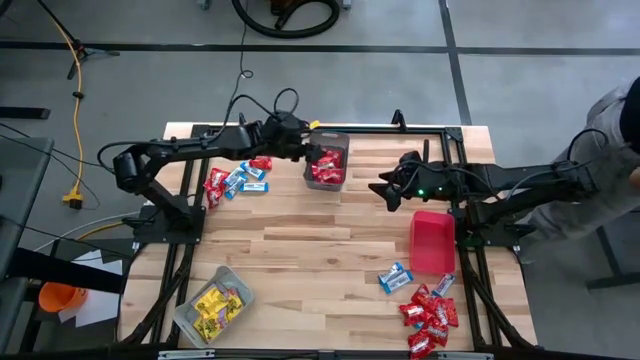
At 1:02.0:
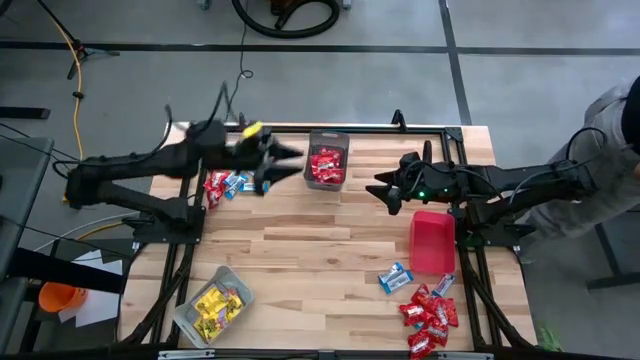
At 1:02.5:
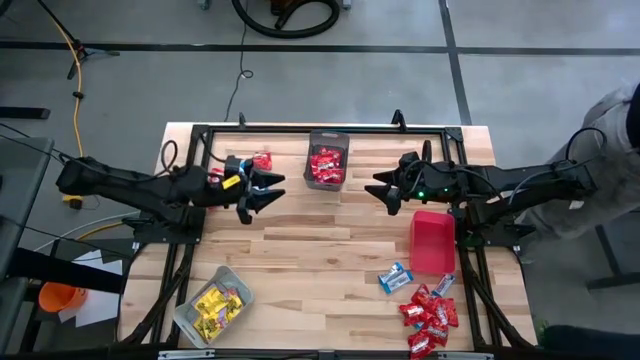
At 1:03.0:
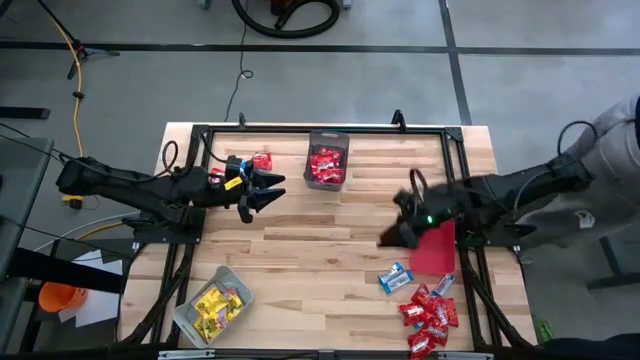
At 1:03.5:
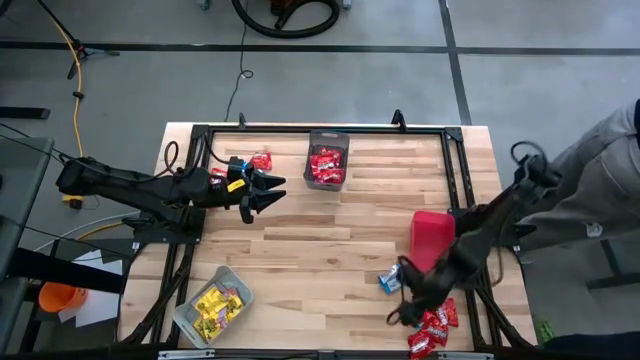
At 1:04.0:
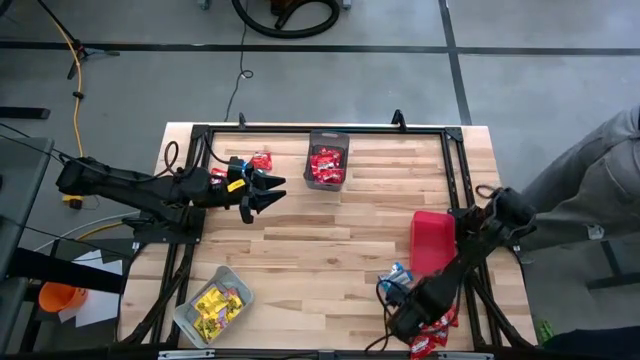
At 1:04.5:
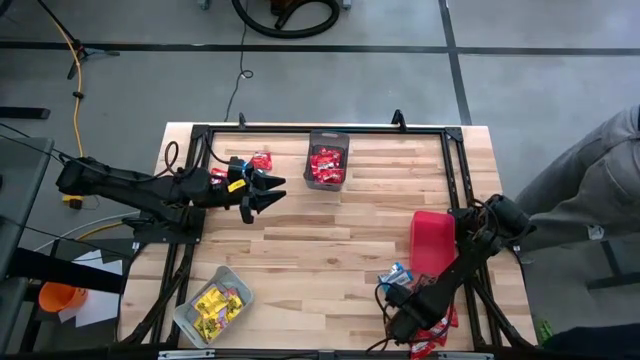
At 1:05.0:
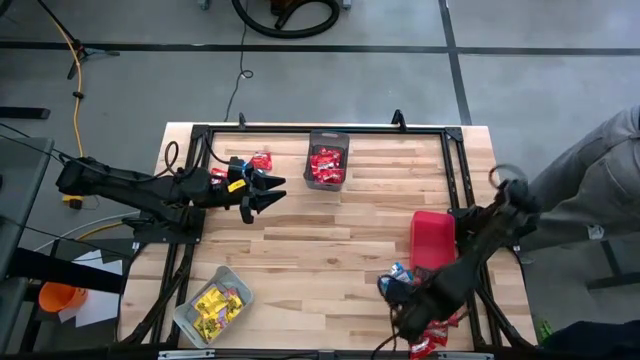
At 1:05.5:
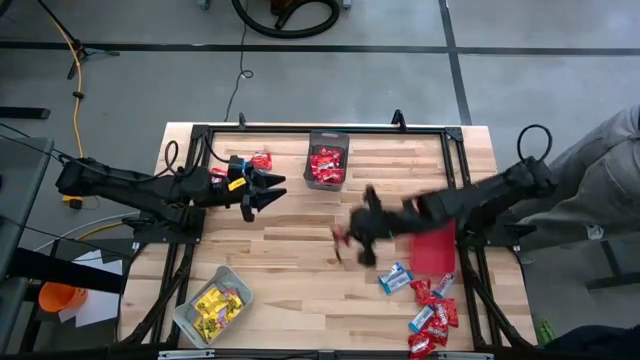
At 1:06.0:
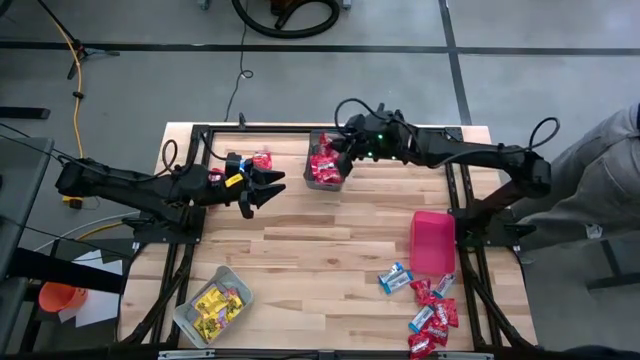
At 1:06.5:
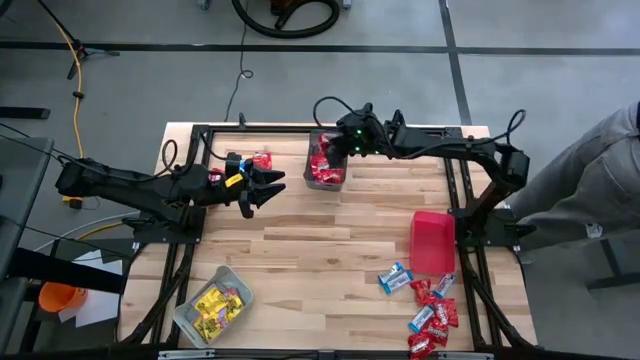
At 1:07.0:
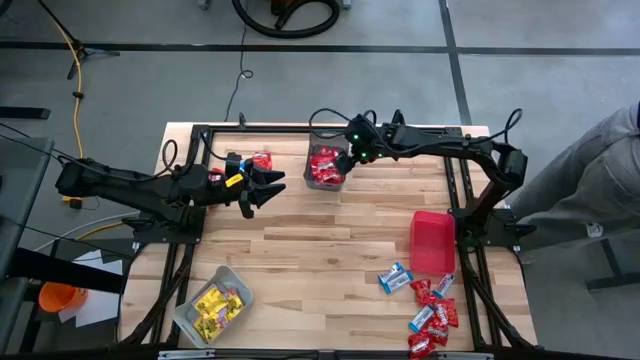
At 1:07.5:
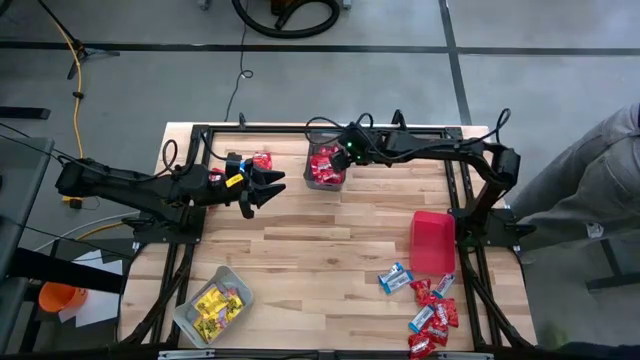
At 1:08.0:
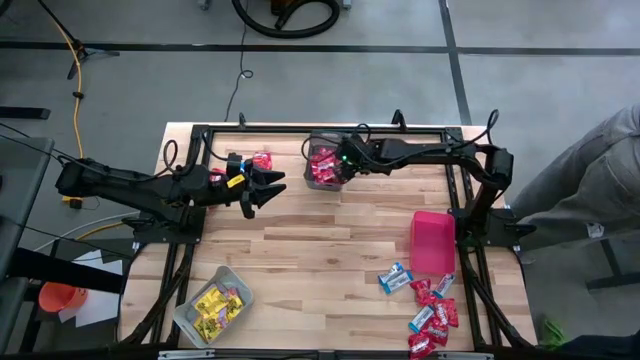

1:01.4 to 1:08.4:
Task: Sort candy
Put the red candy pack into the black bin

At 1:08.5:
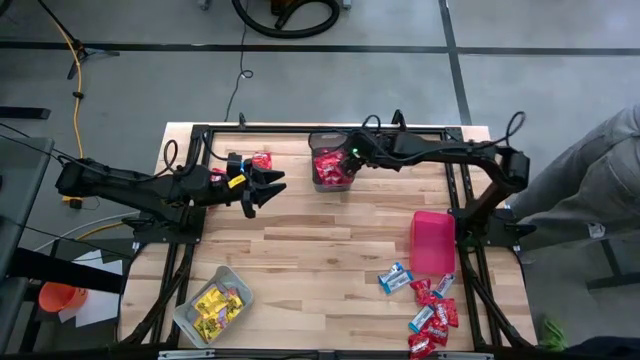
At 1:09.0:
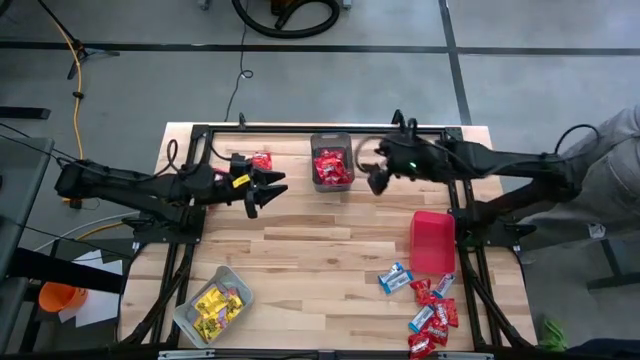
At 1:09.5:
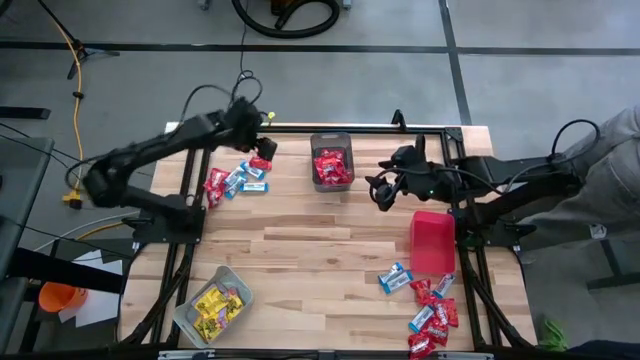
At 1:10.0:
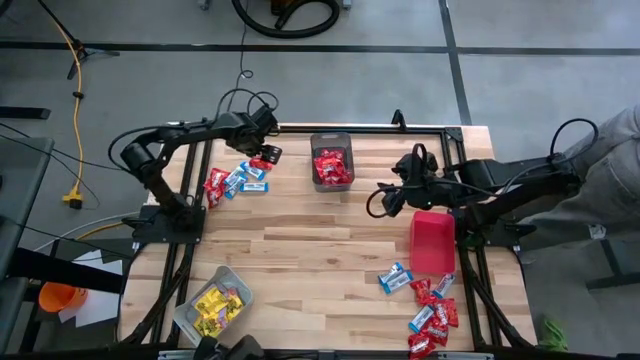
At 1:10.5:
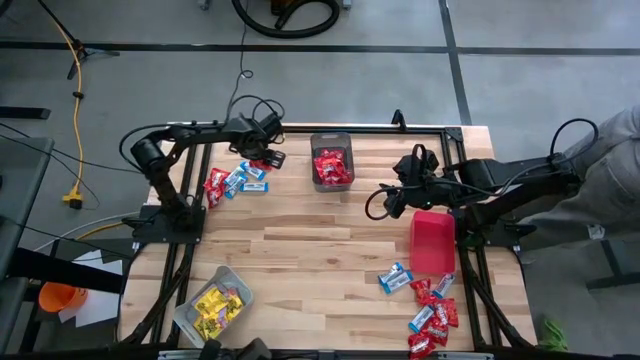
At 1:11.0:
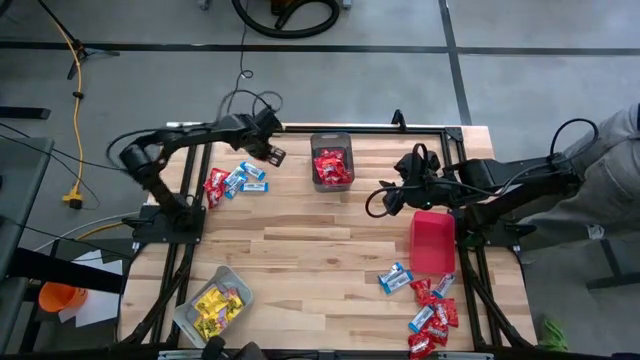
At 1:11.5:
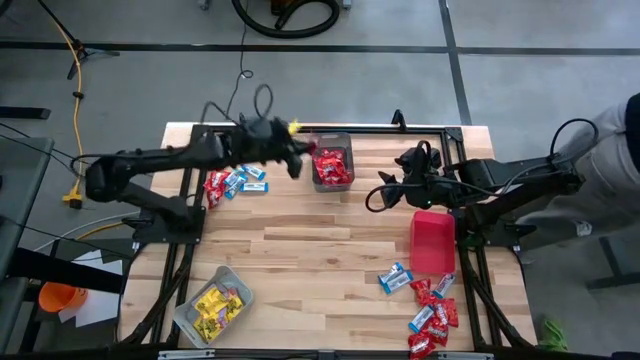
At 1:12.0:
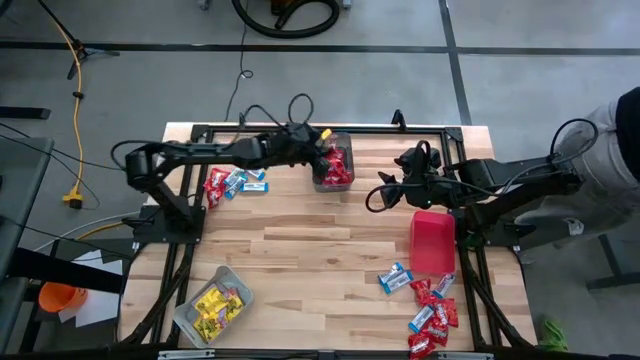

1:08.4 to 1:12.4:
Put the red candy pack into the black bin

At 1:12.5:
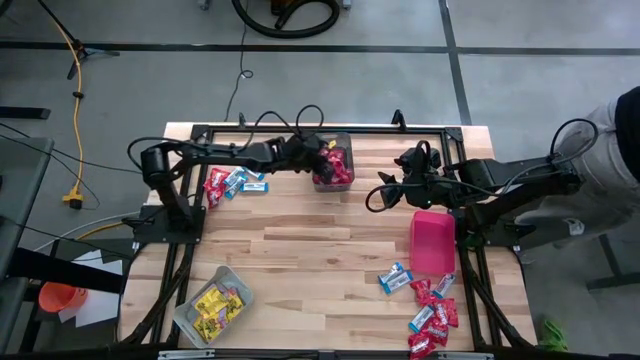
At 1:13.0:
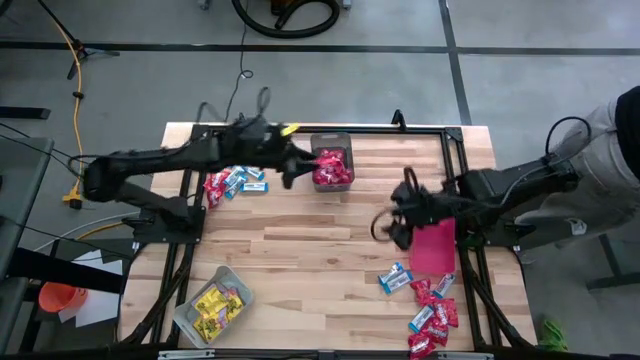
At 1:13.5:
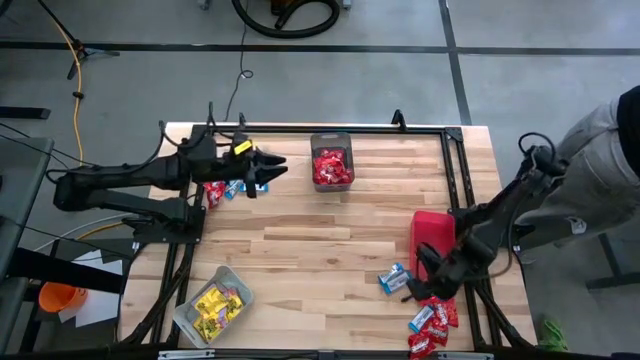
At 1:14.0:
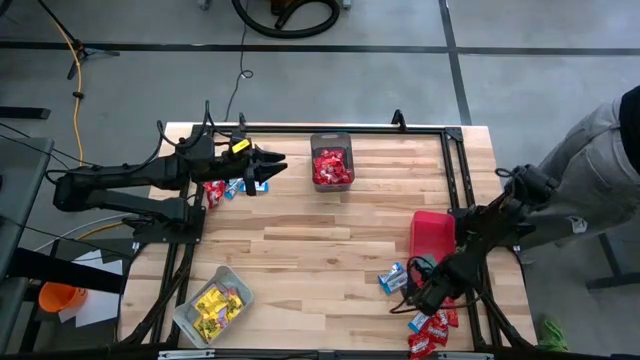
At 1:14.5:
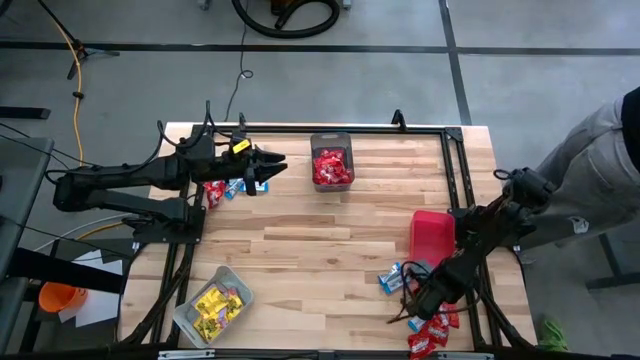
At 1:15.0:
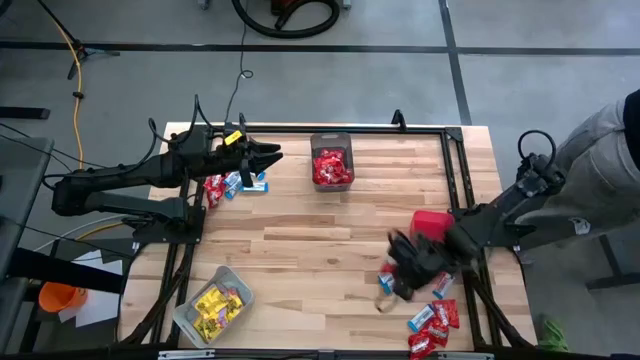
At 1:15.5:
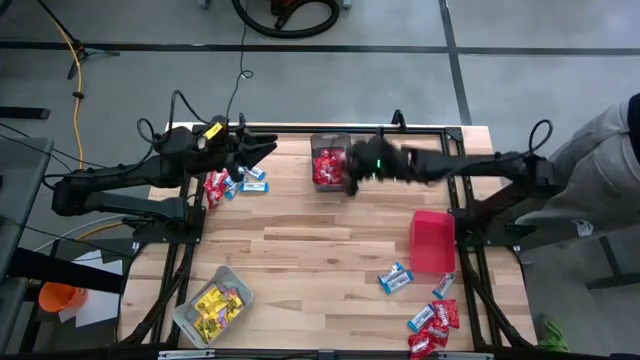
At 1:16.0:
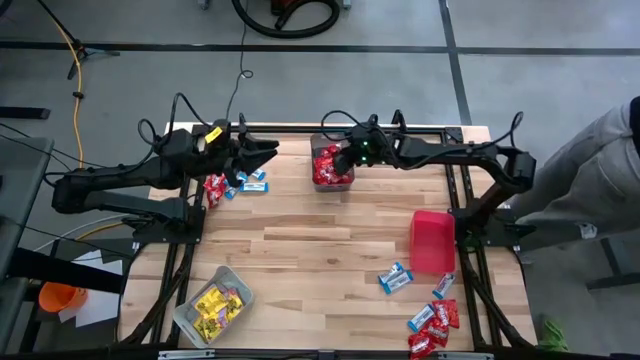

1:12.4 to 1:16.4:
Put the red candy pack into the black bin

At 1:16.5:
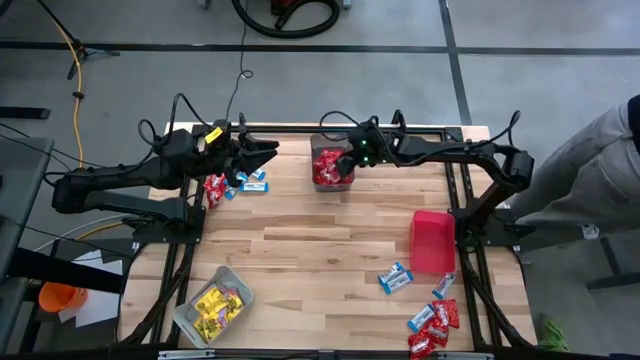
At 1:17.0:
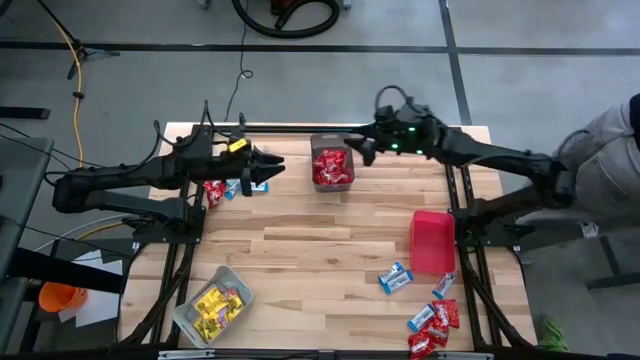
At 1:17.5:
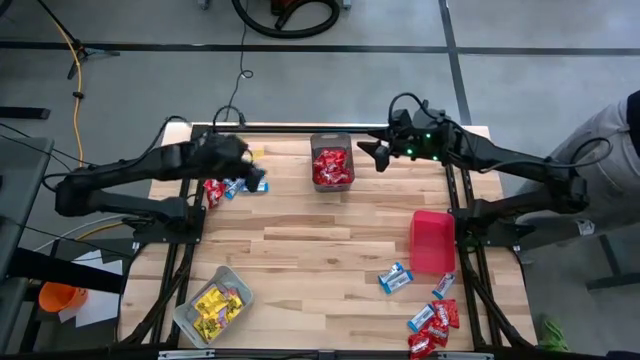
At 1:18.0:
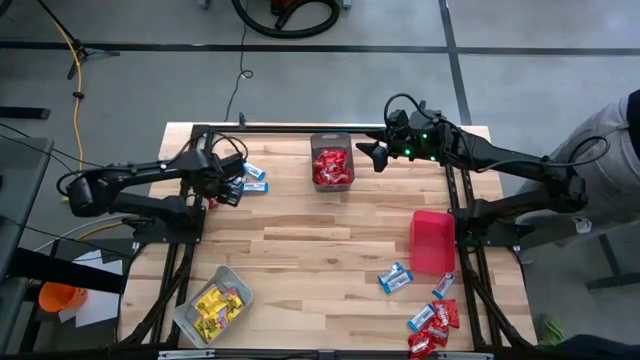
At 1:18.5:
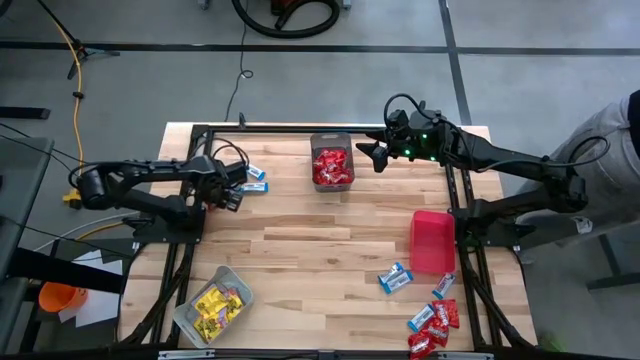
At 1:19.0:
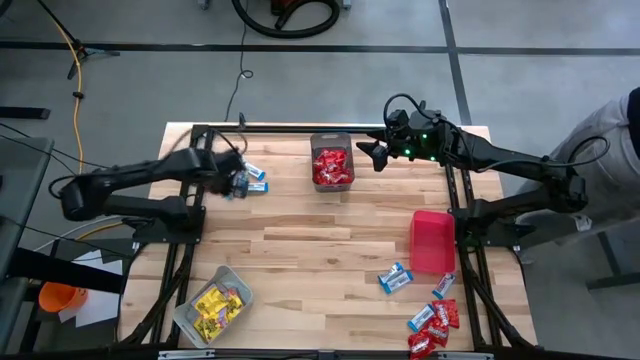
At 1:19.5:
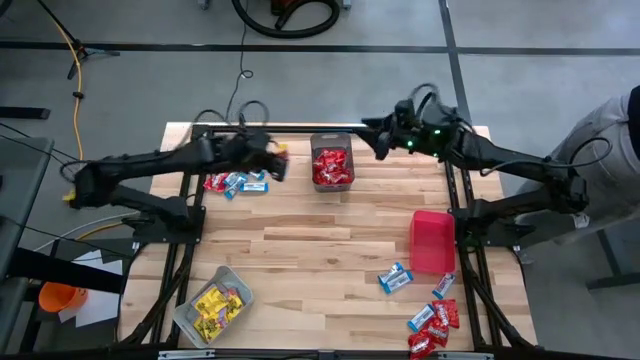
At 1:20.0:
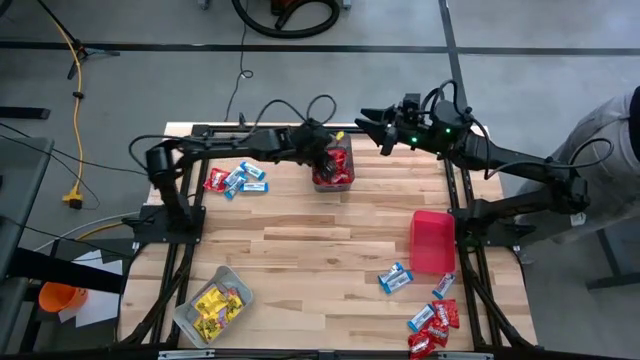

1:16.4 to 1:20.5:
Put the red candy pack into the black bin

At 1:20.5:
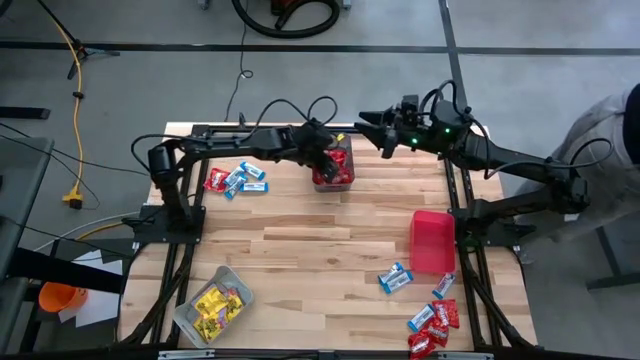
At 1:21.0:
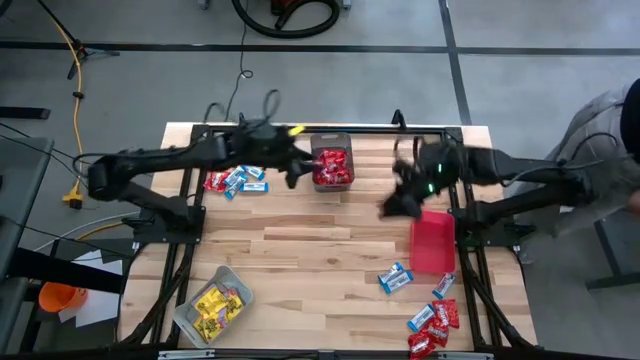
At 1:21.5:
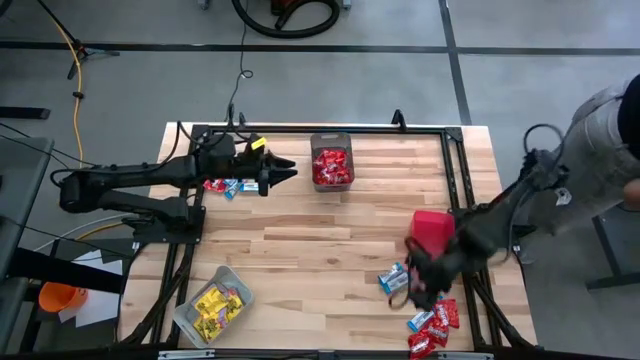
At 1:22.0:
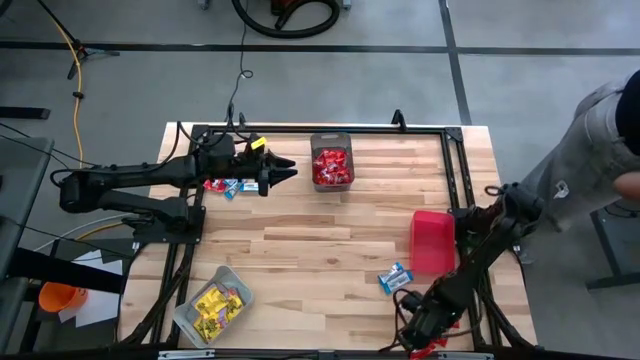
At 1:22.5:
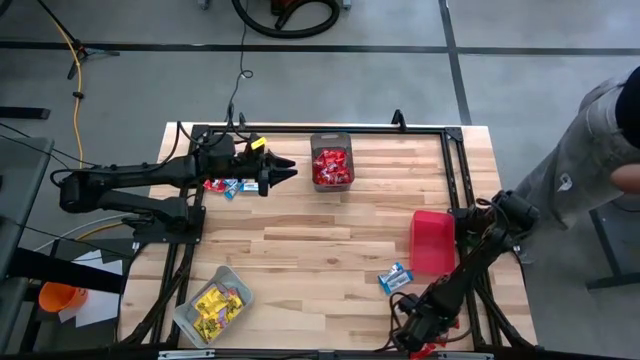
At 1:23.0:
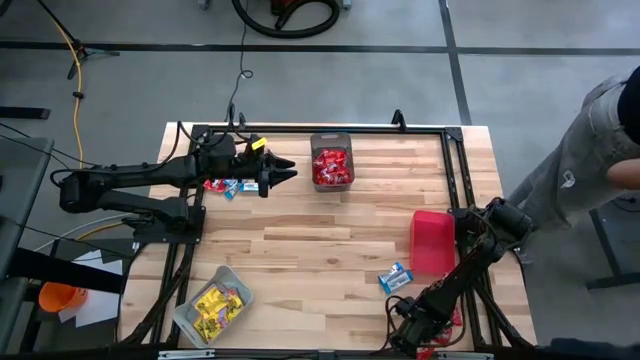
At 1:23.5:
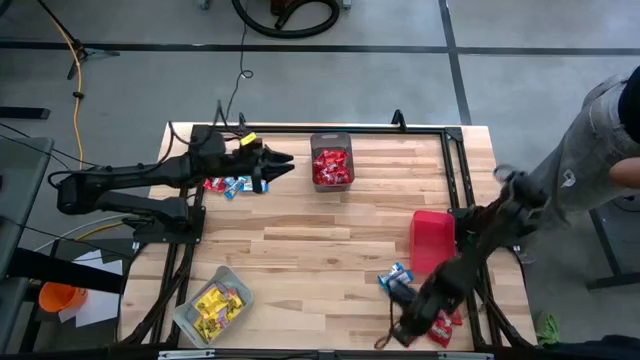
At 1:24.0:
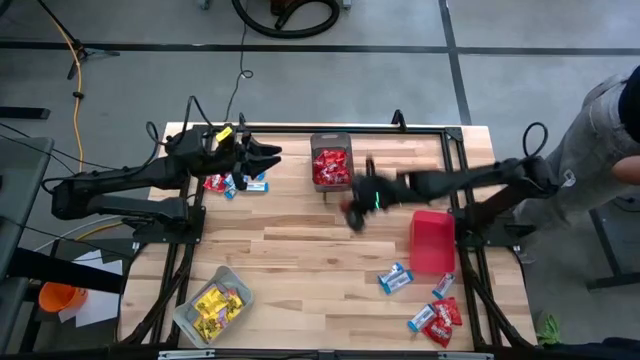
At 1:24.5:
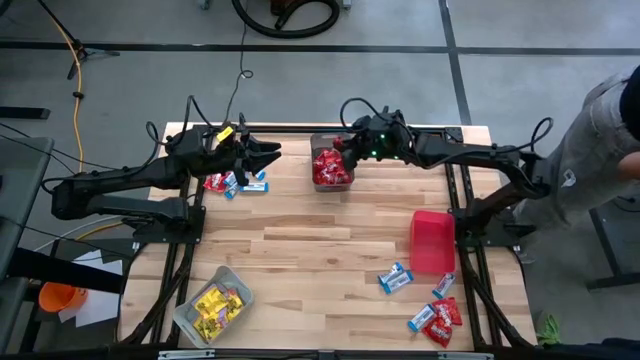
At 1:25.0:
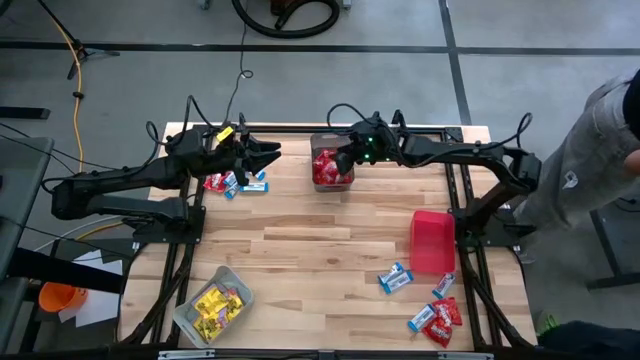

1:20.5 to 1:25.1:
Put the red candy pack into the black bin
